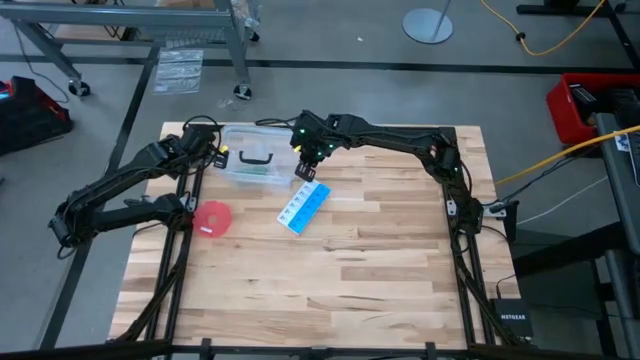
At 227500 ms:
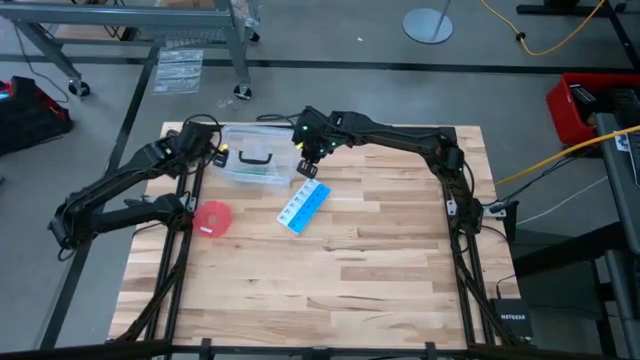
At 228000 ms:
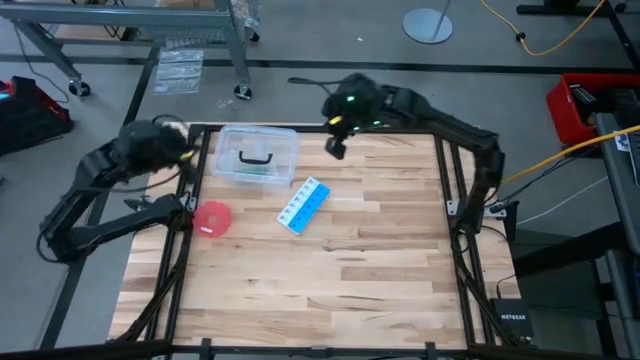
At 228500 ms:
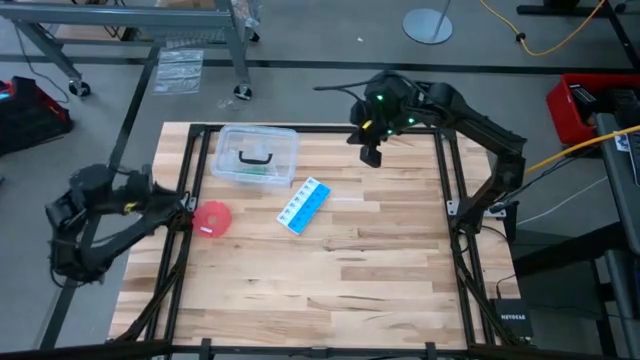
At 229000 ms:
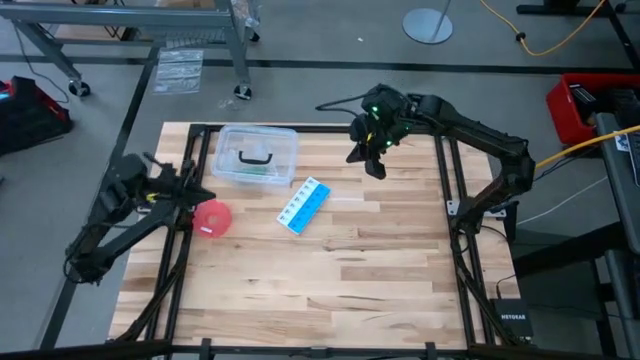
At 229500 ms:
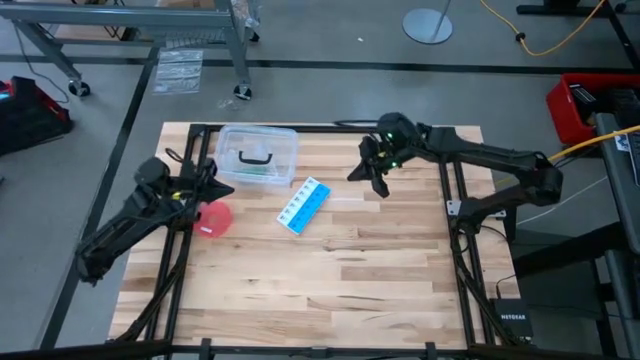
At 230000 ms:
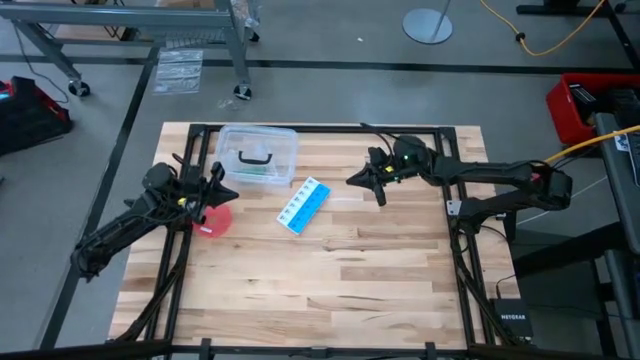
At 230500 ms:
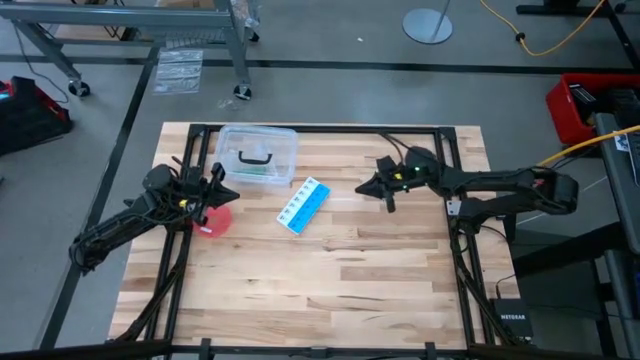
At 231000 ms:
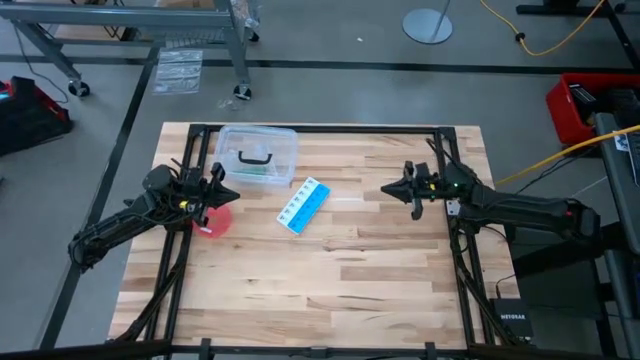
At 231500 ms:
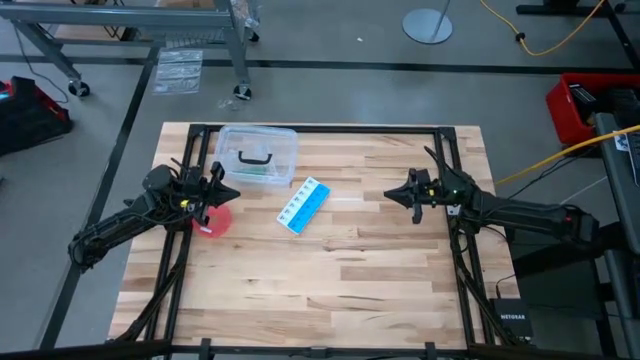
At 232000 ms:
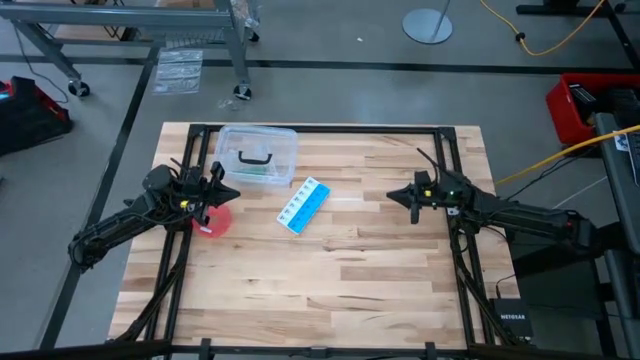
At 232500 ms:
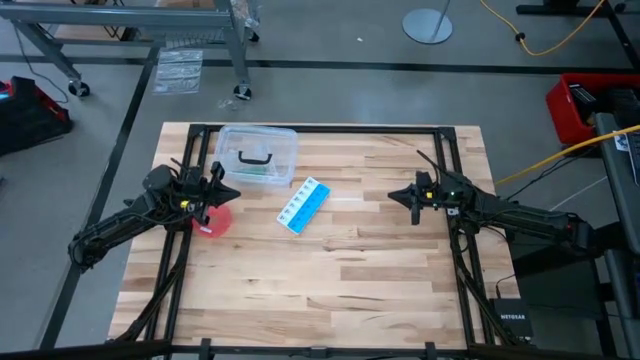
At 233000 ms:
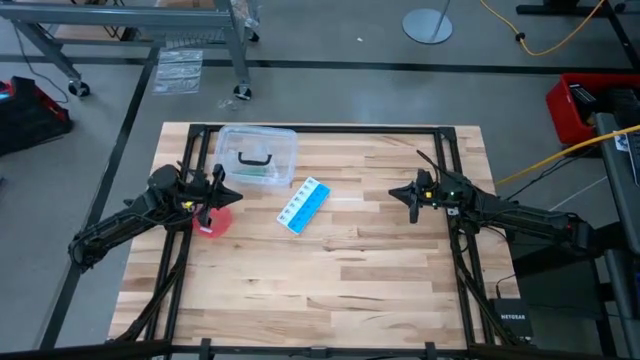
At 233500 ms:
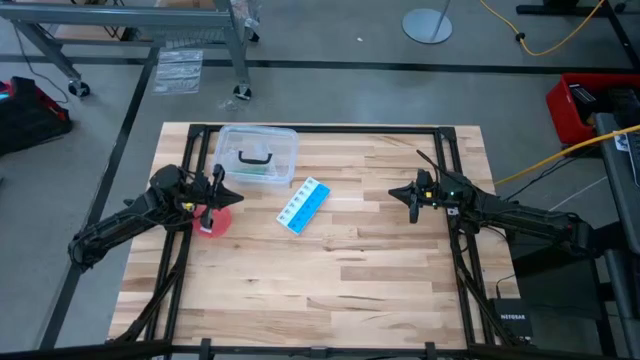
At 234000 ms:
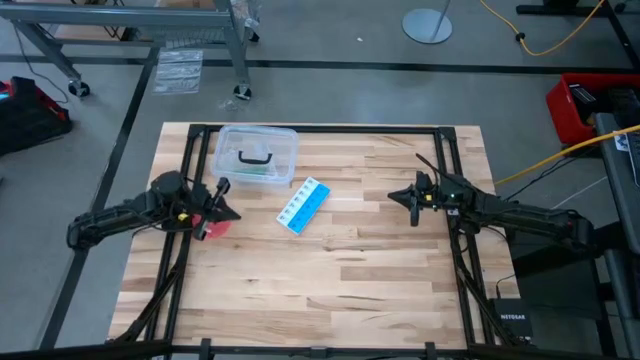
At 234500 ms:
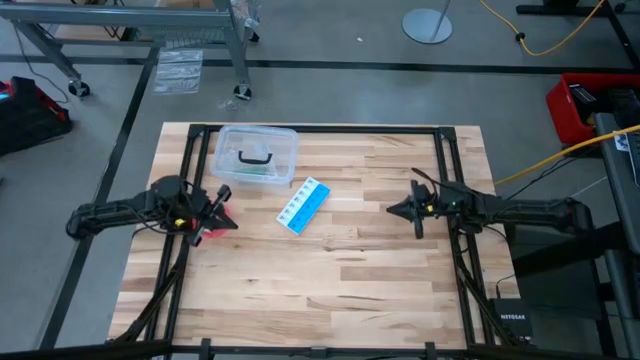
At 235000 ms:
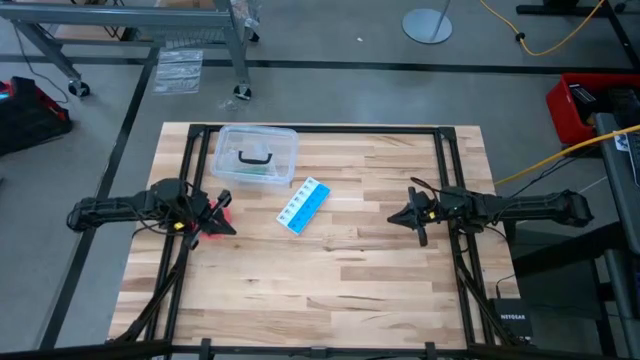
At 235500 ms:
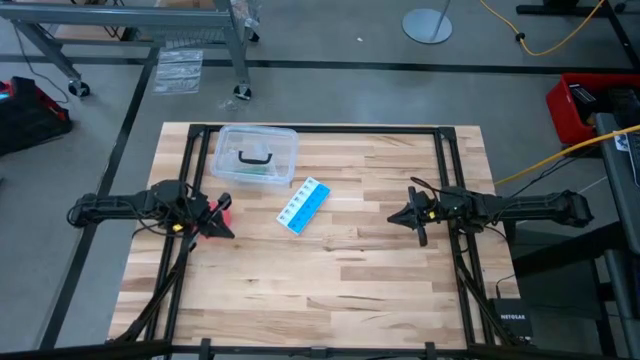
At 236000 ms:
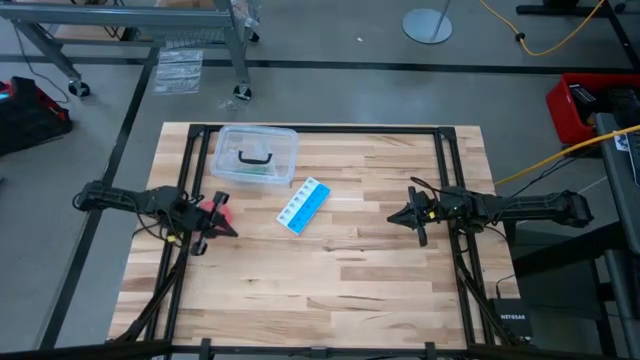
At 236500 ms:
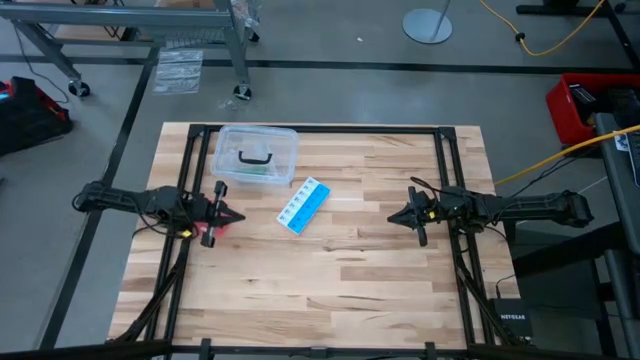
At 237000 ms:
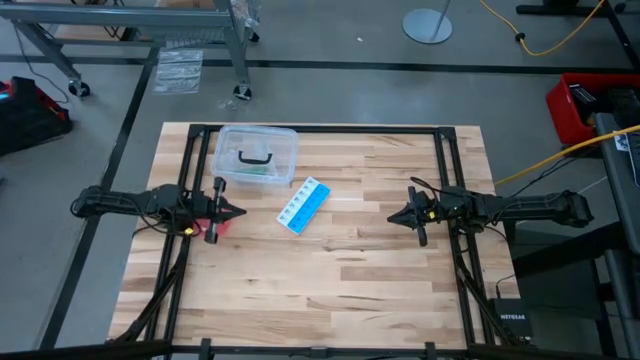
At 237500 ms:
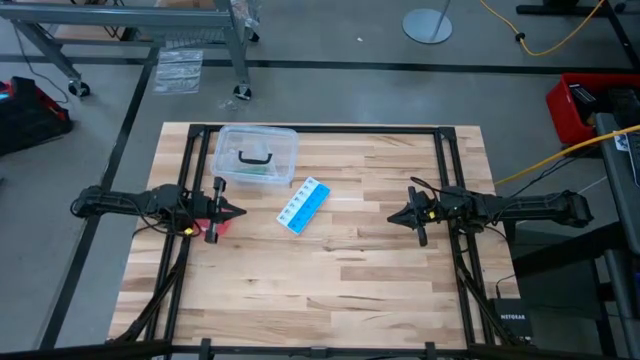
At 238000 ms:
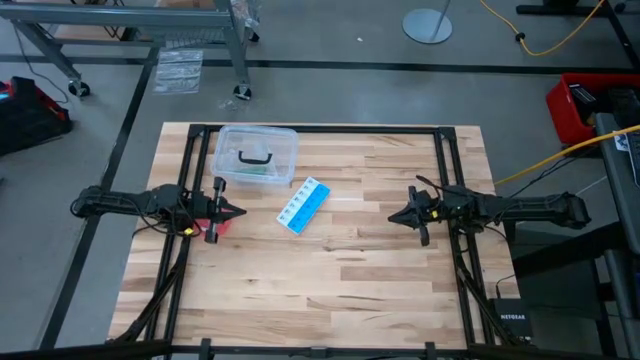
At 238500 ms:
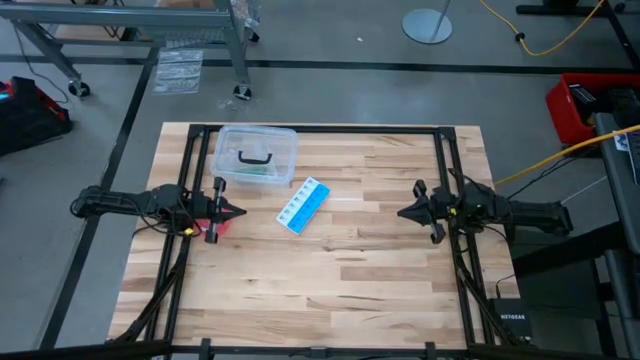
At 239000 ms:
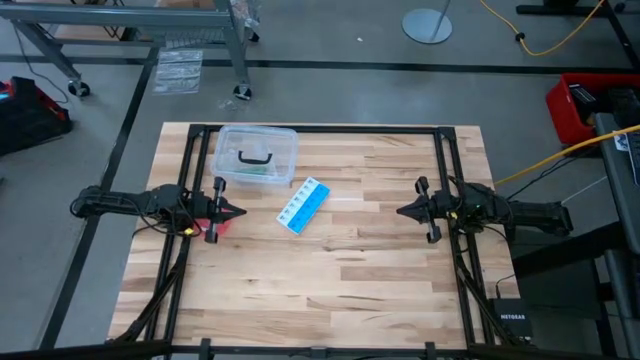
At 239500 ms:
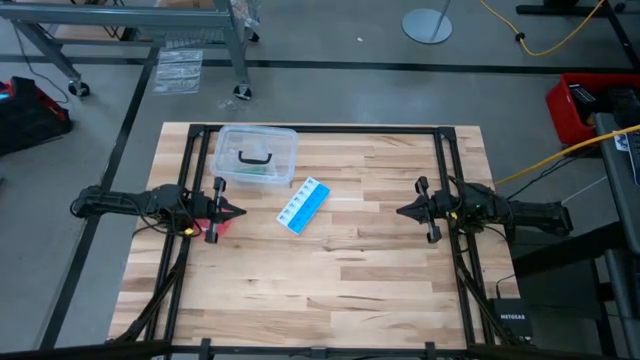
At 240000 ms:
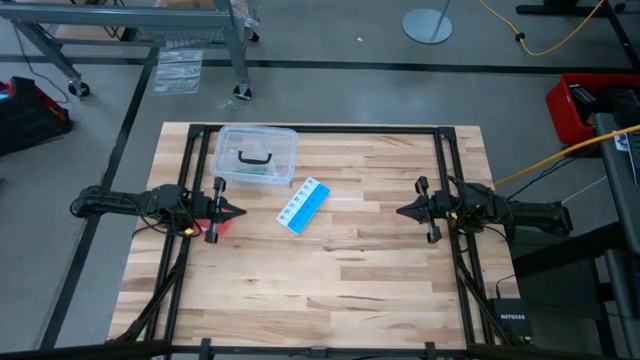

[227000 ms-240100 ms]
Task: Roll bandage
Return to Home Position

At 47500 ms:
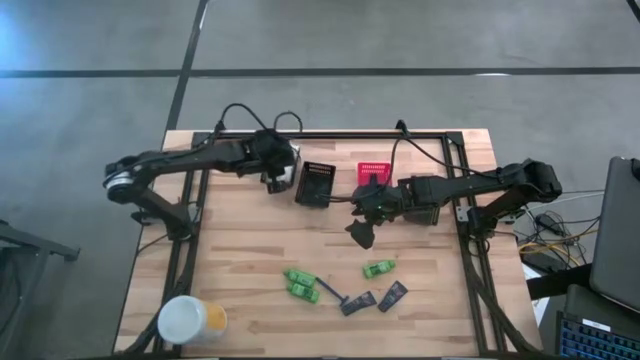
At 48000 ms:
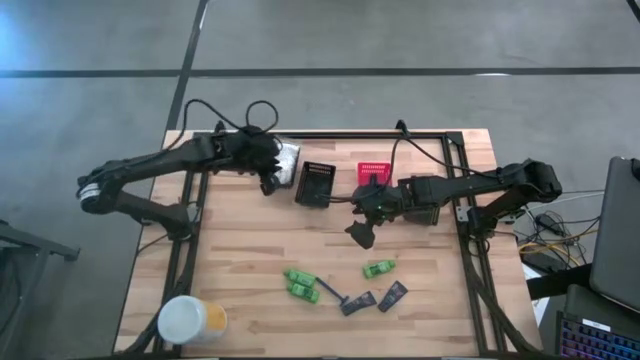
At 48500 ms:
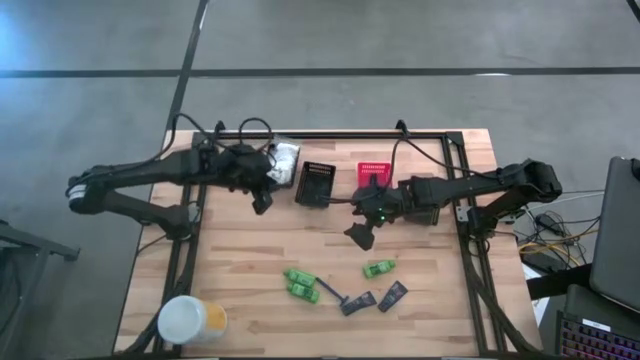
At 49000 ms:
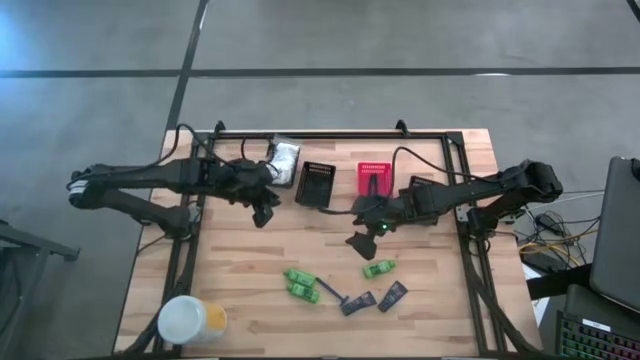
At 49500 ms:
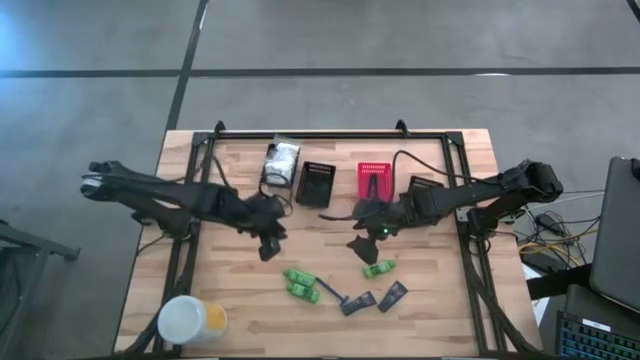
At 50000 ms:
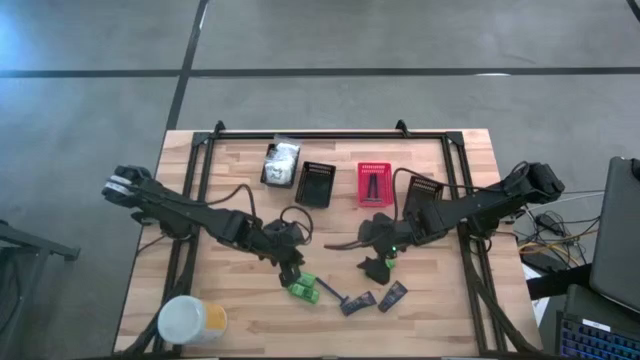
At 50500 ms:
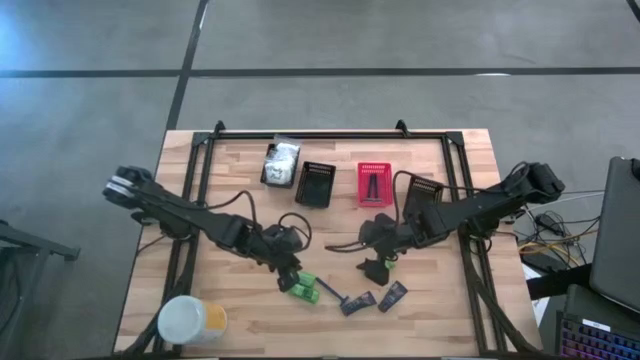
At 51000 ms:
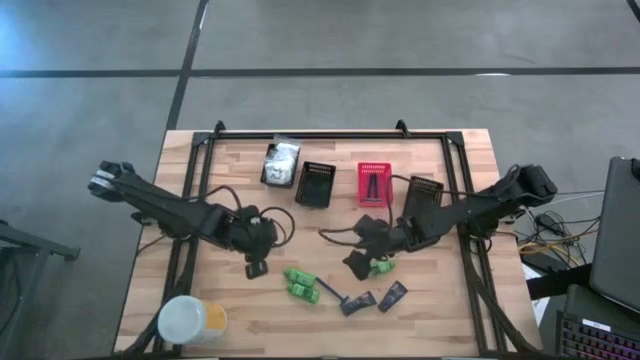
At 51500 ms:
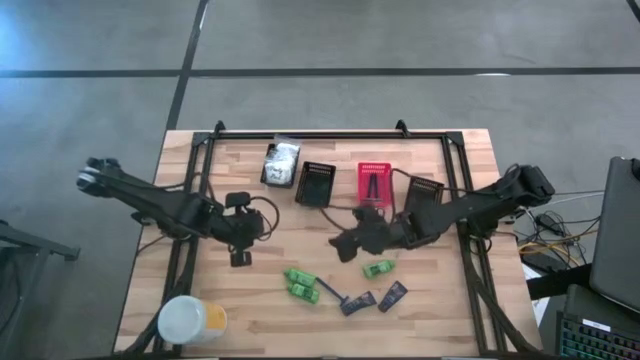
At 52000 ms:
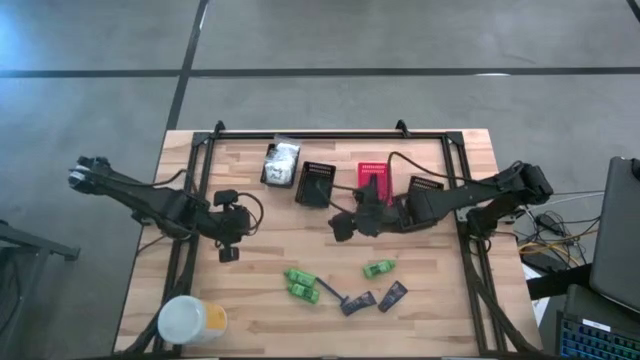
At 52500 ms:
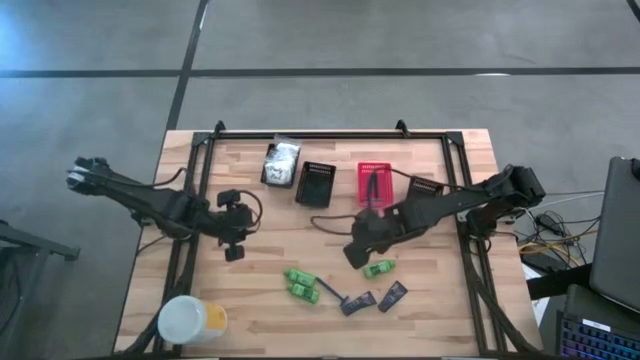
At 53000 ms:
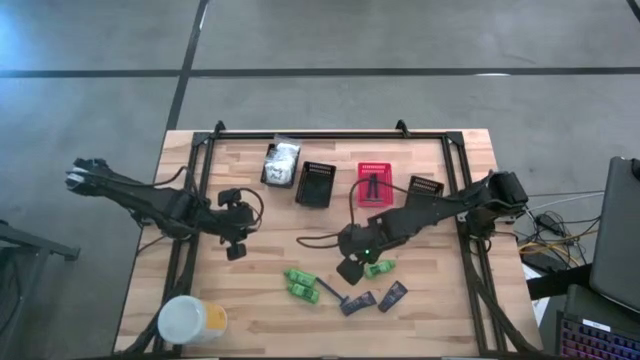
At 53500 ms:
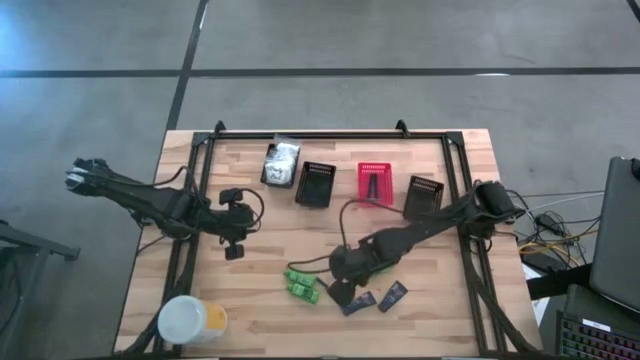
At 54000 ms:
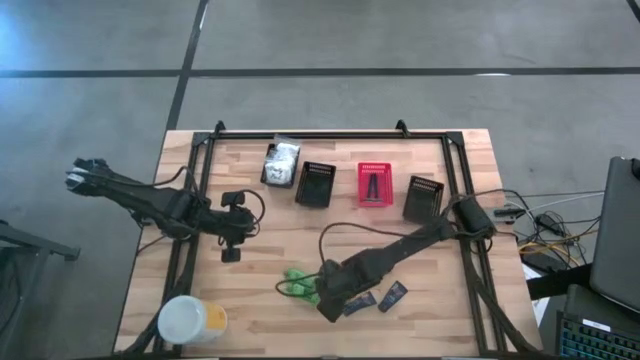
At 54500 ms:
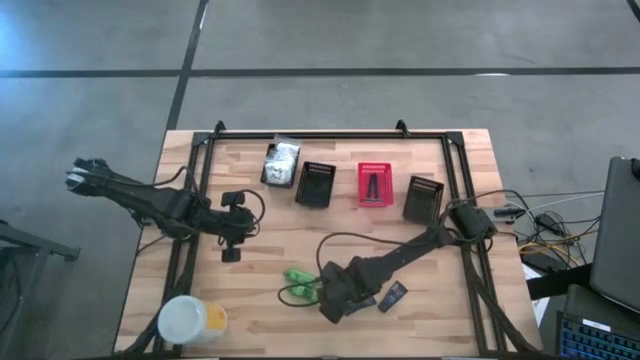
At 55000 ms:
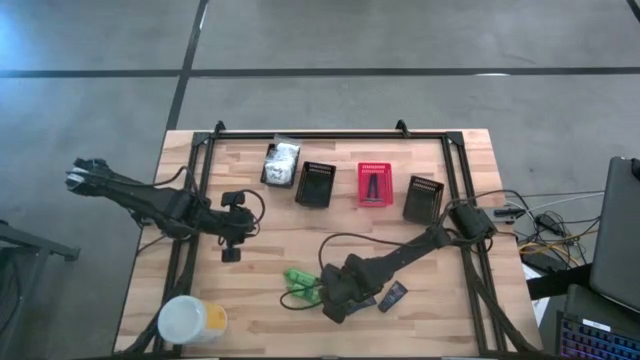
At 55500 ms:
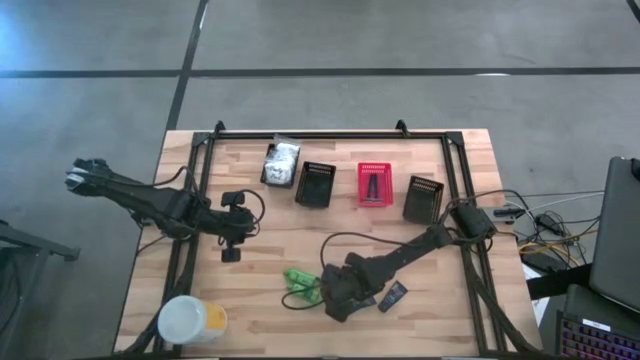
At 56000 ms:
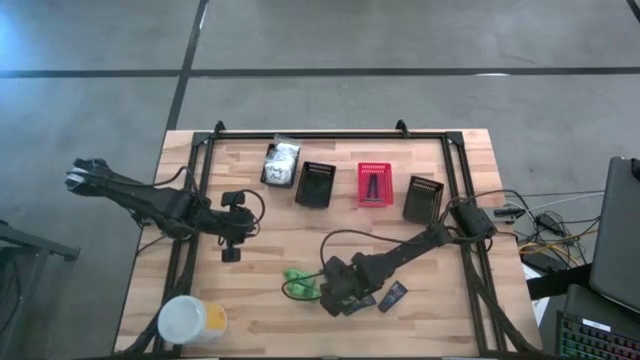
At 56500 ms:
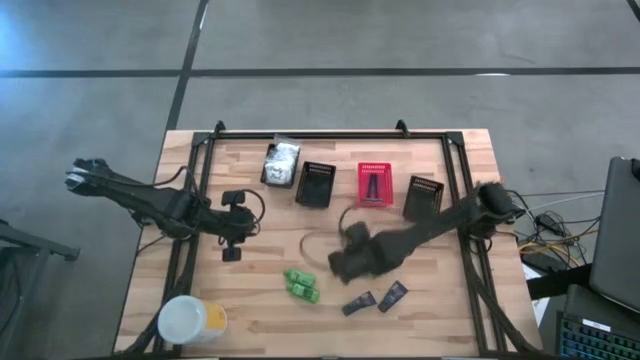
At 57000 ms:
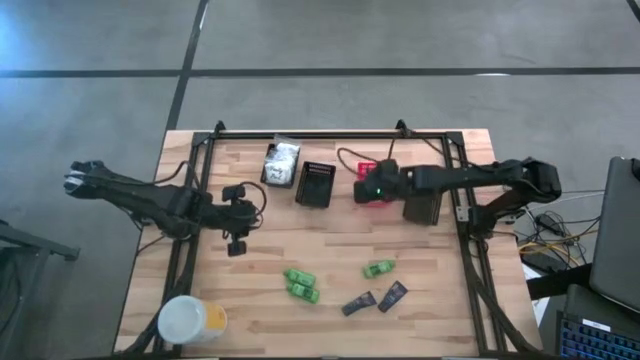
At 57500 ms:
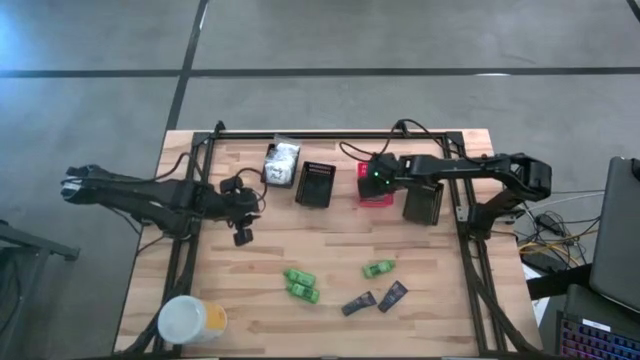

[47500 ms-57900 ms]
Task: Pick & Place Travel size toiletries
Put the blue razor into the red bin
